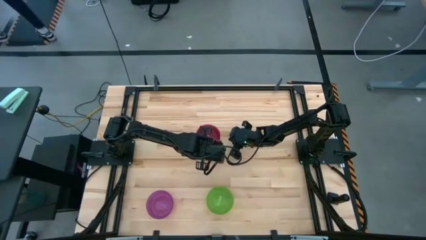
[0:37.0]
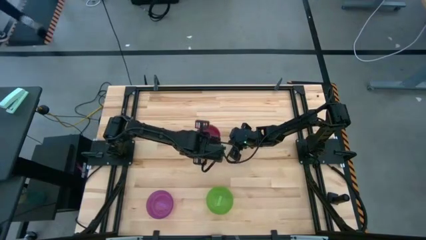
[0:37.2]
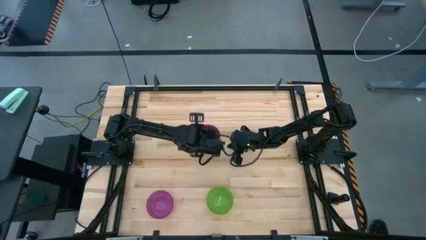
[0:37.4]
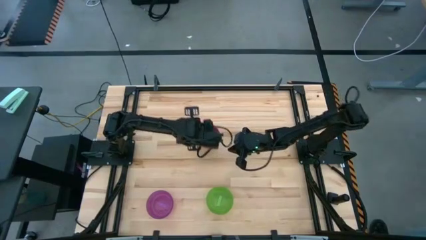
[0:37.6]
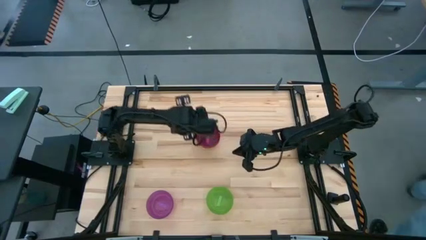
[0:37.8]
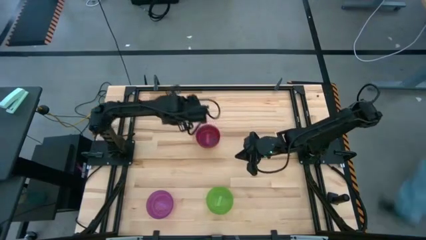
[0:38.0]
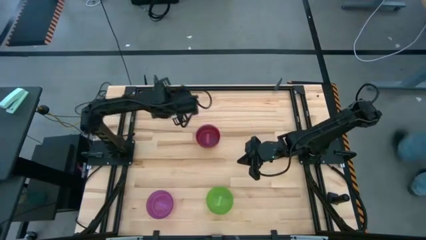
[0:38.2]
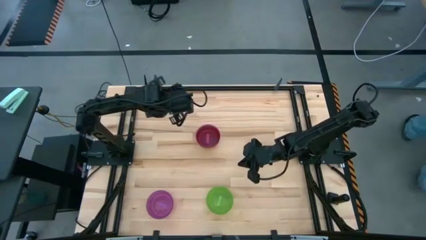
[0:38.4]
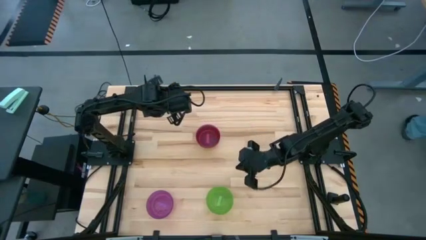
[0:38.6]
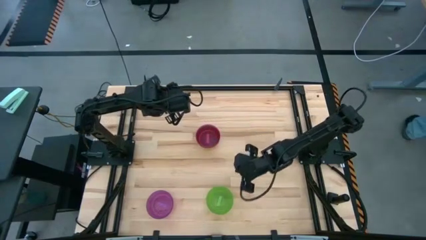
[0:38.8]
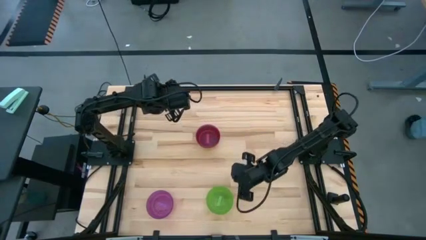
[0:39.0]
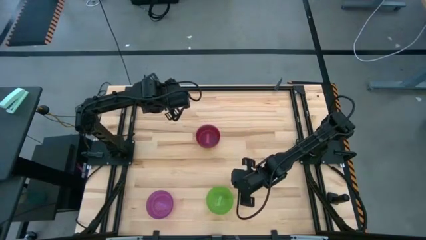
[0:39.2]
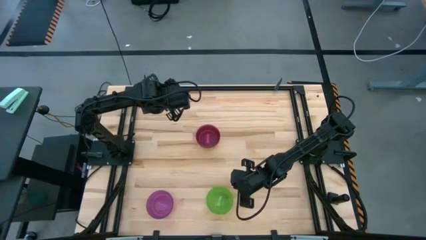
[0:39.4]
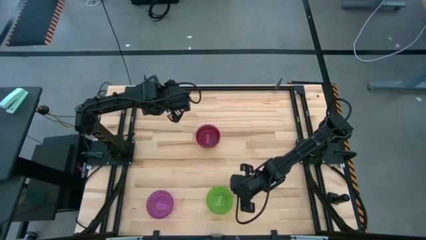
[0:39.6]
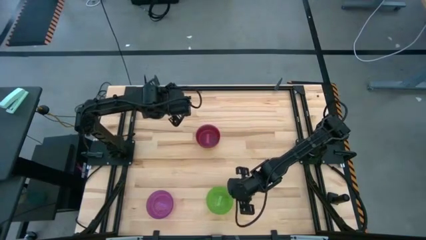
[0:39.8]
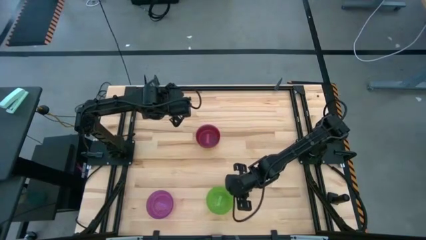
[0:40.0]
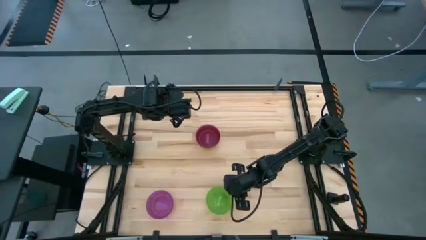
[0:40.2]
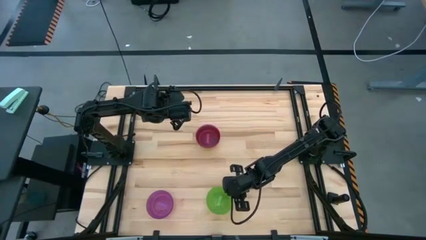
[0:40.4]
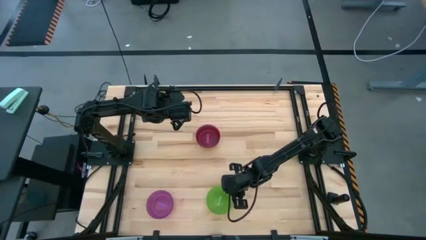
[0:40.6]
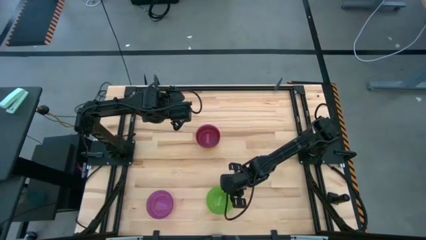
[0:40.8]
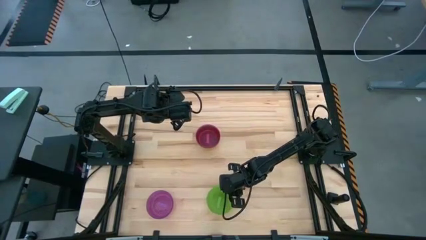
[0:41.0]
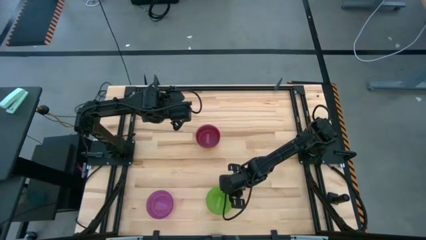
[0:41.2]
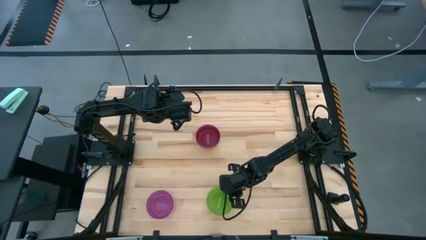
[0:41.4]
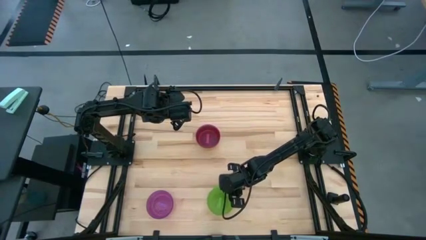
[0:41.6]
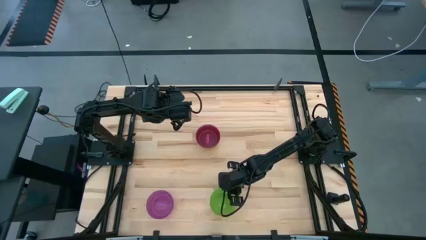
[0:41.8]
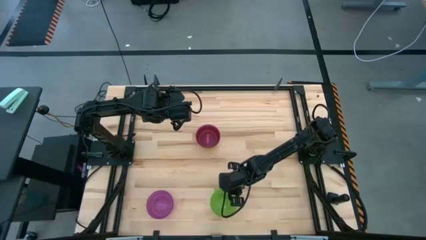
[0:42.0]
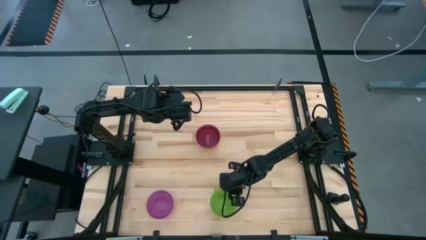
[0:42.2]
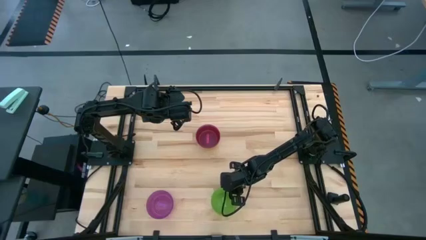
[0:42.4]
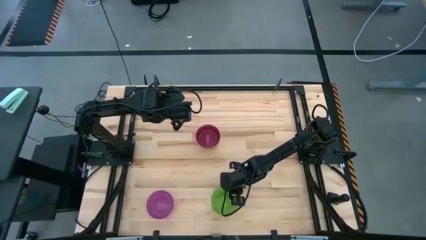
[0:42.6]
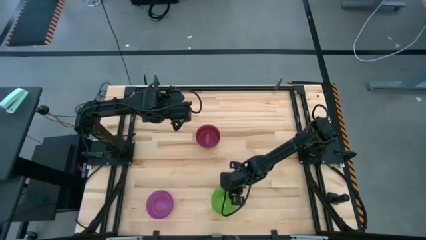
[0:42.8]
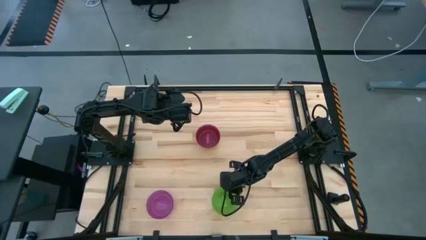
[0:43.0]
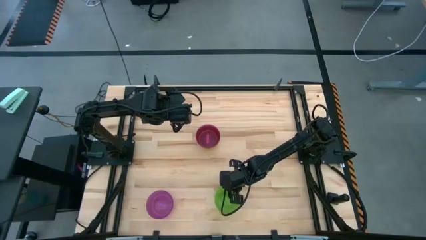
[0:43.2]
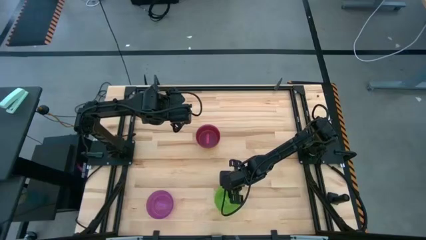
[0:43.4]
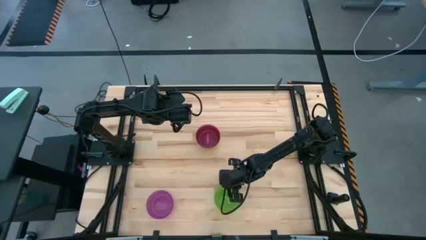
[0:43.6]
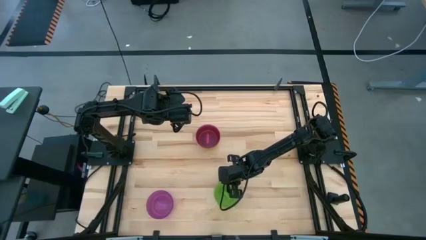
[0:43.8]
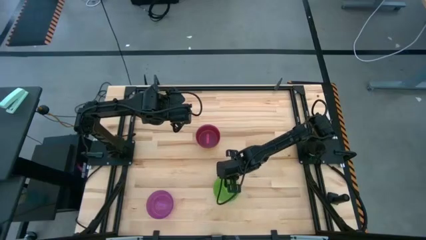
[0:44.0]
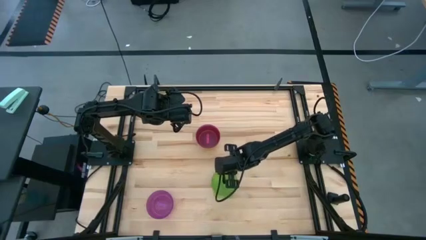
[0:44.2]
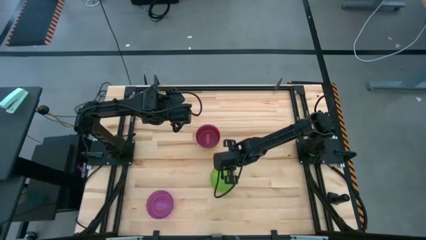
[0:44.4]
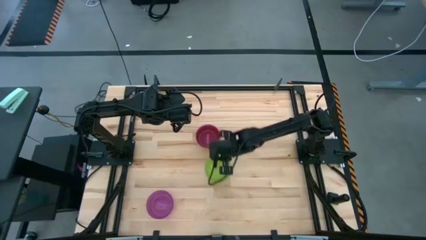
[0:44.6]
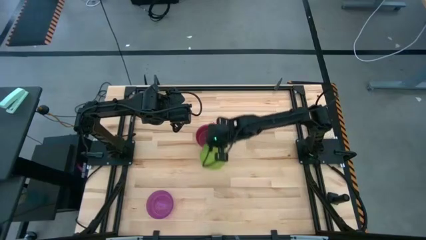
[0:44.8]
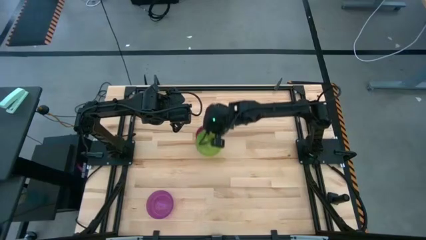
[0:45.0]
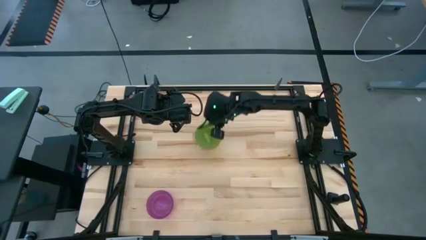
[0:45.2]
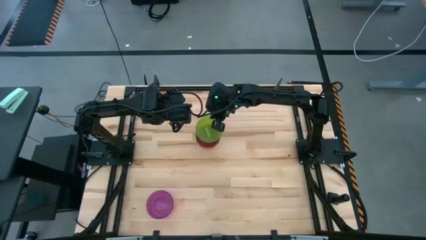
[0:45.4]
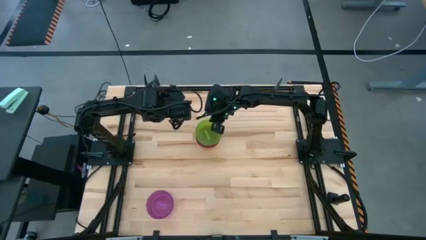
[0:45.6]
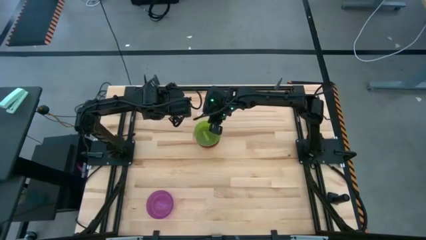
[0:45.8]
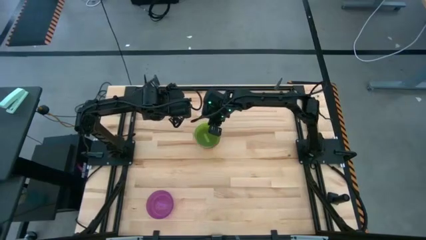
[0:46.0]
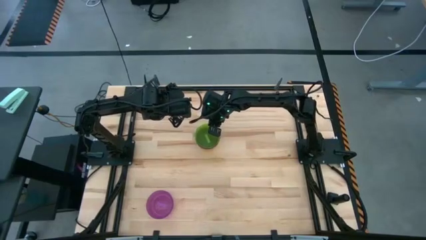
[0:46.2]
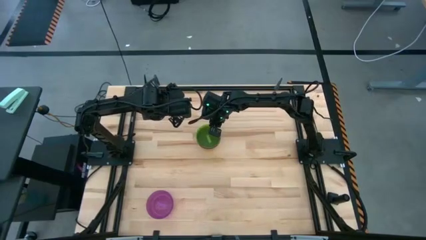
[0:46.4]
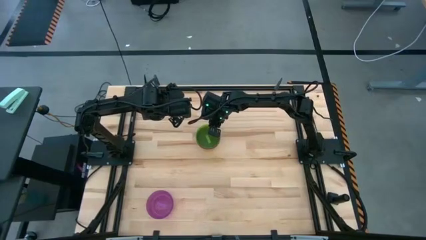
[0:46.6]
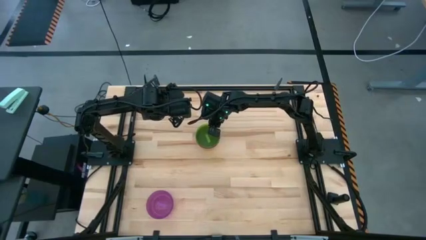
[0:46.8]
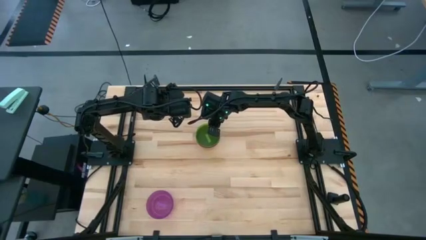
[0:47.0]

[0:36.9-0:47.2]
Task: Nest bowls inside each other
Stack the green bowl on top of the red bowl
